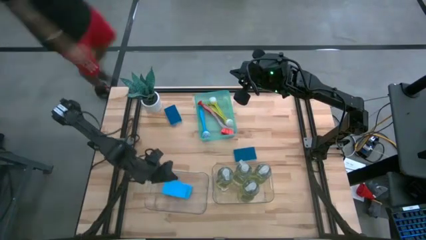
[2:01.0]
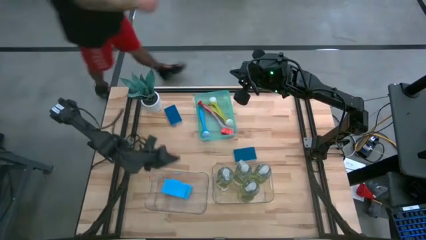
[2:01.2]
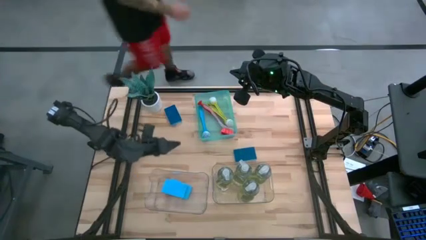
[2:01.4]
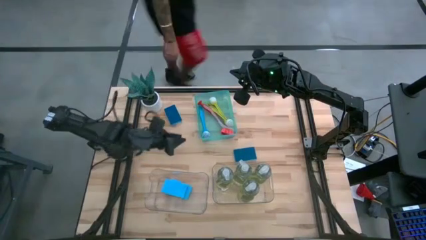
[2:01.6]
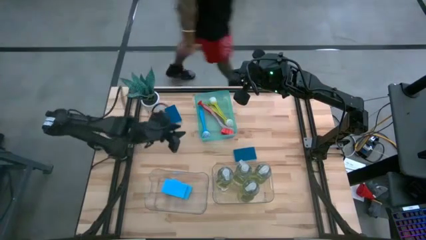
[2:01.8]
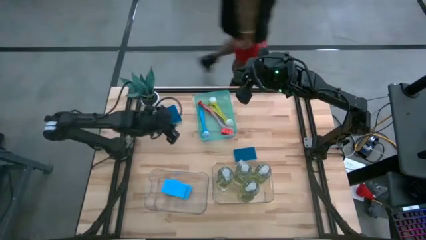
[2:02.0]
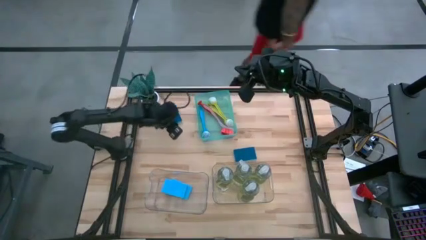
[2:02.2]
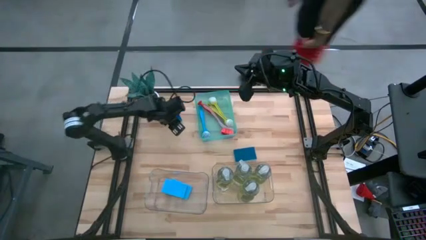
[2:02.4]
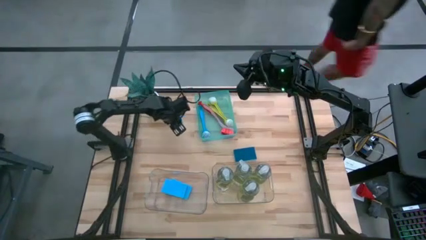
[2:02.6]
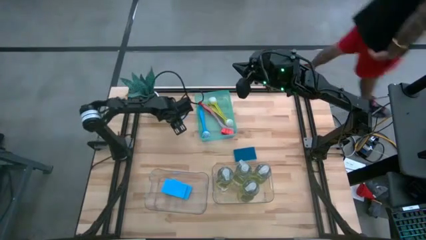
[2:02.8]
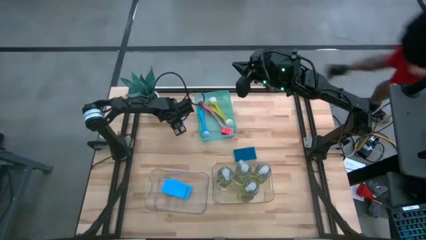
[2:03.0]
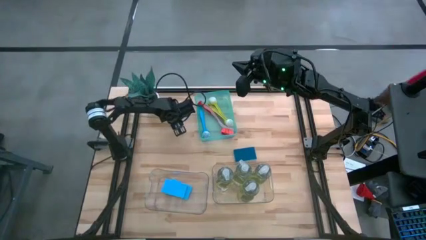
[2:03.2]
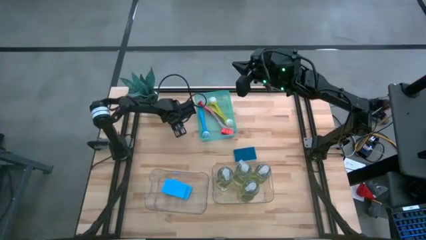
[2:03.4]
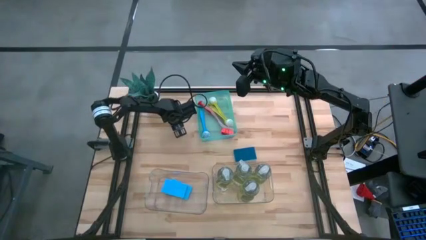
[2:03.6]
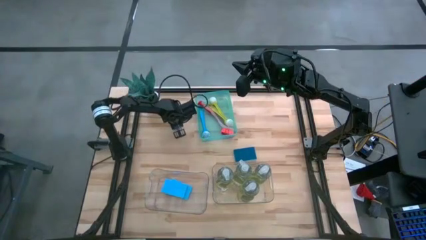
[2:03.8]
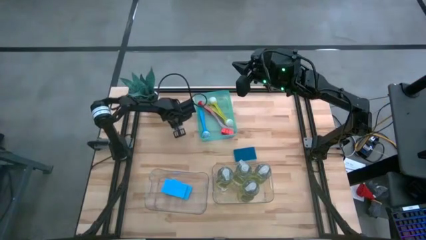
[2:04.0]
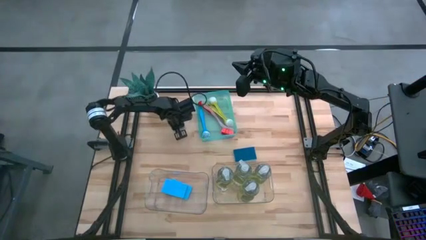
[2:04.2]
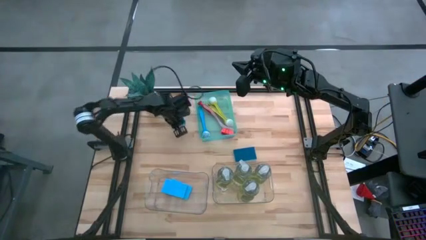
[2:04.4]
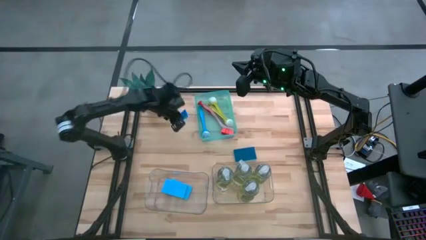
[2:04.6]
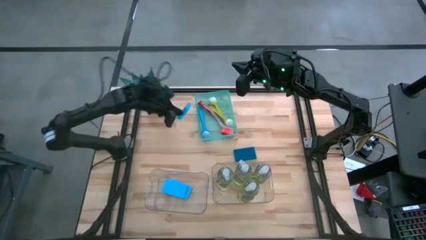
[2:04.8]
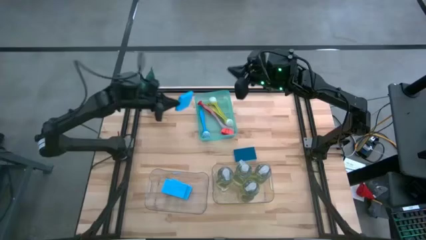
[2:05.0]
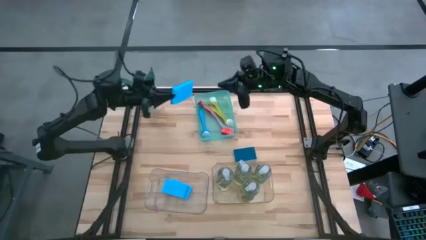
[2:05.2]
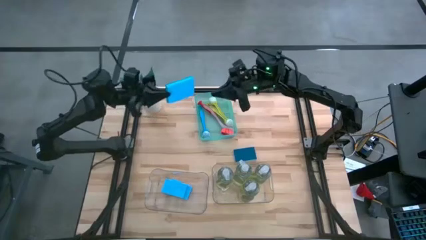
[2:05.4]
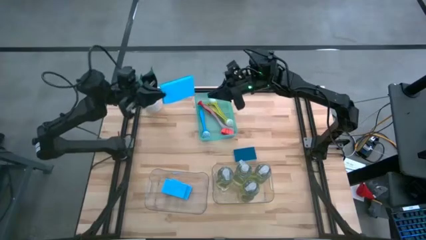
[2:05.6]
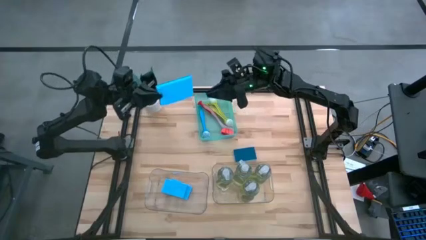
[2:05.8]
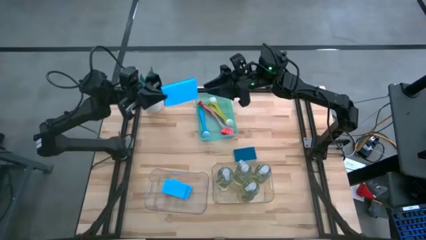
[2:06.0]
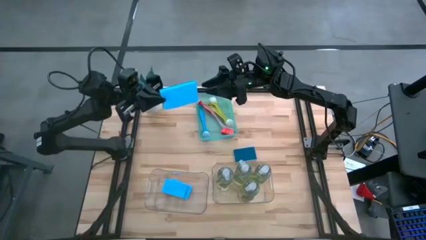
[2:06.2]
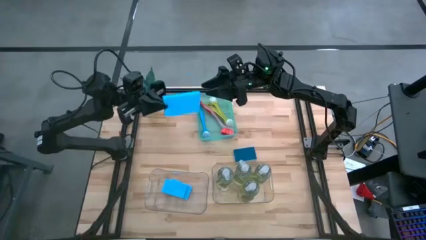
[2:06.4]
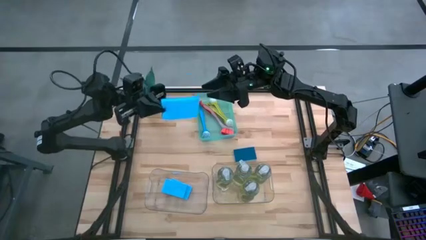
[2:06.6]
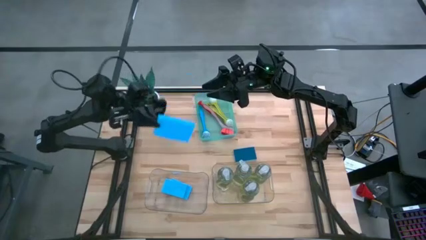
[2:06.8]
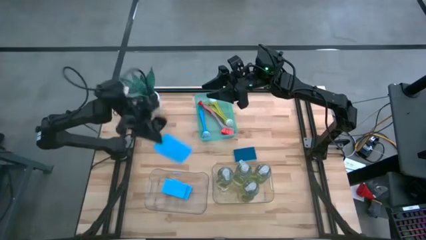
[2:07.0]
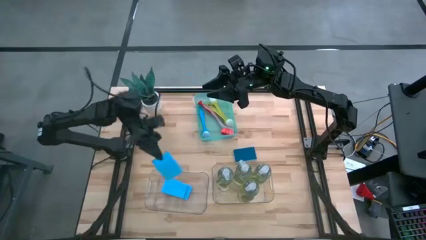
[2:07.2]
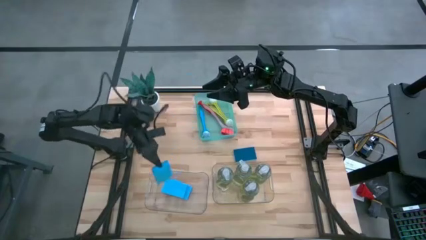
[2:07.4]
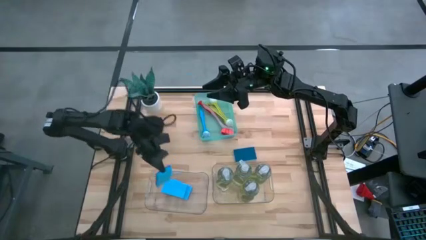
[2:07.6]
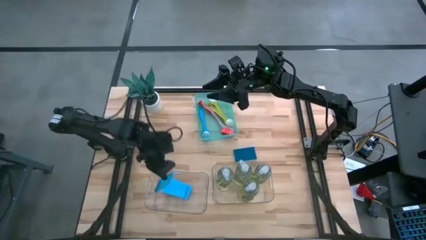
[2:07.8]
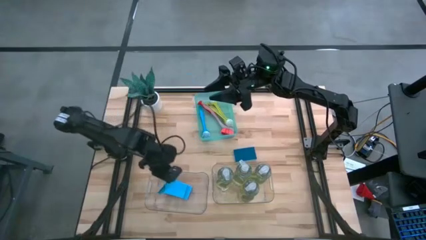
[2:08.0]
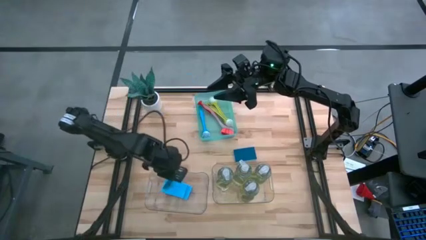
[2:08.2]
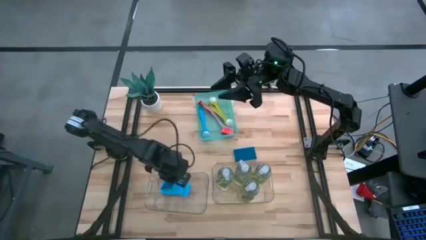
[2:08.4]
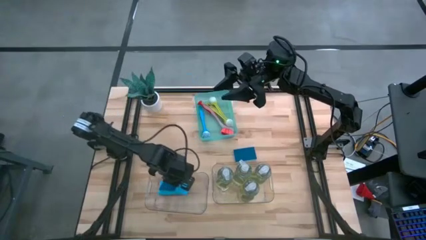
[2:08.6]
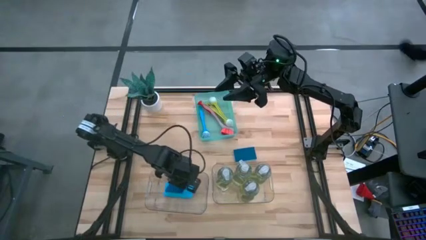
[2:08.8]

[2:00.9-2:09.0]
Task: Pick & Place Kitchen Sink Supplies
Put the blue sponge into the left transparent bin

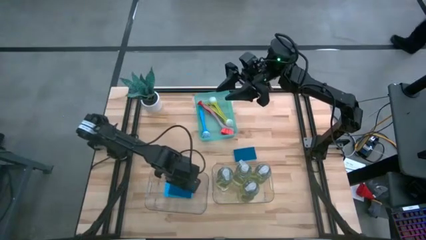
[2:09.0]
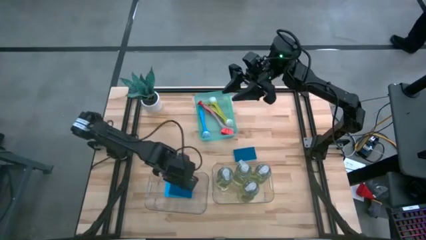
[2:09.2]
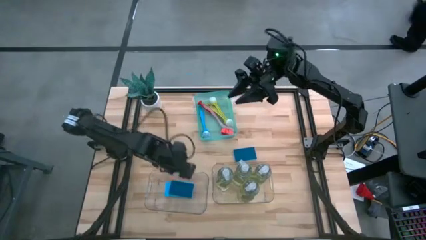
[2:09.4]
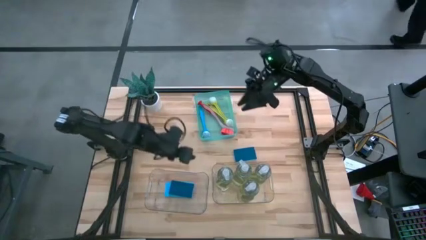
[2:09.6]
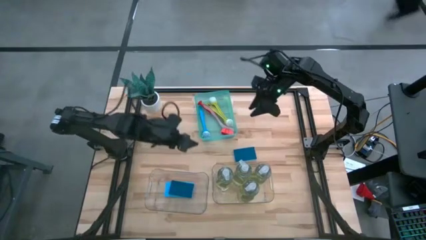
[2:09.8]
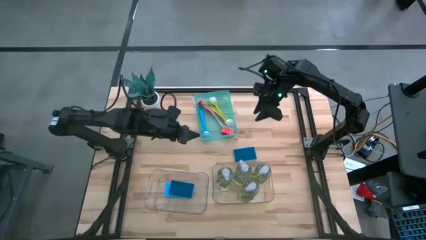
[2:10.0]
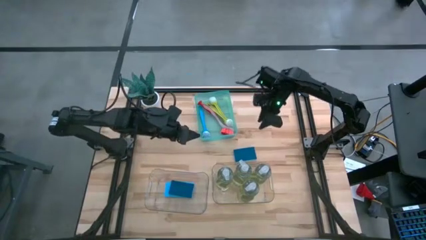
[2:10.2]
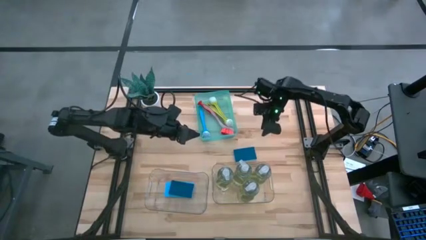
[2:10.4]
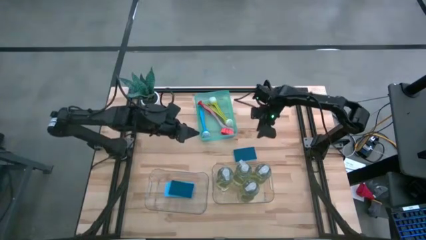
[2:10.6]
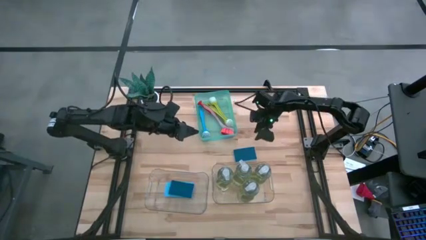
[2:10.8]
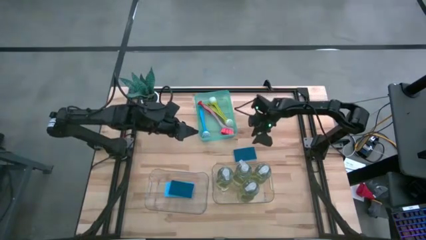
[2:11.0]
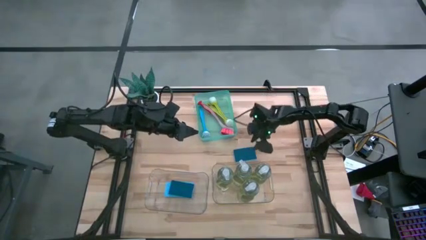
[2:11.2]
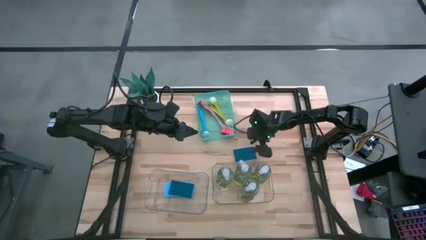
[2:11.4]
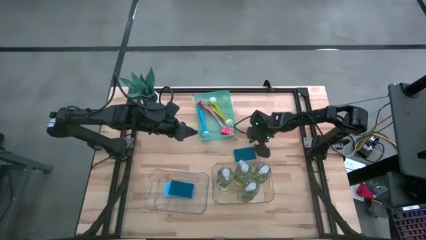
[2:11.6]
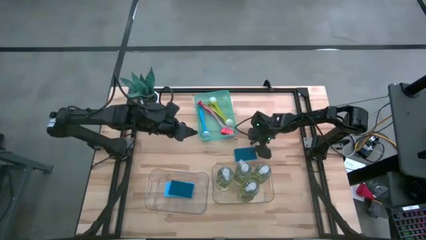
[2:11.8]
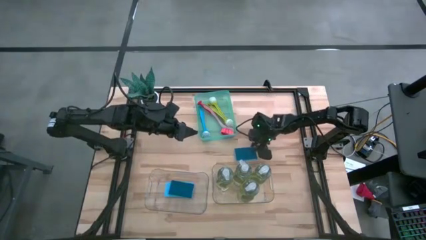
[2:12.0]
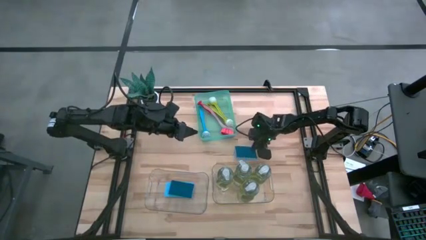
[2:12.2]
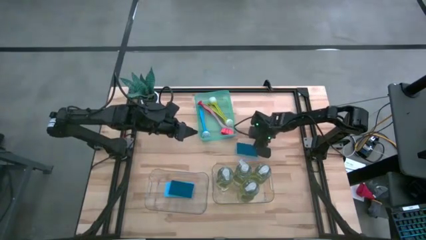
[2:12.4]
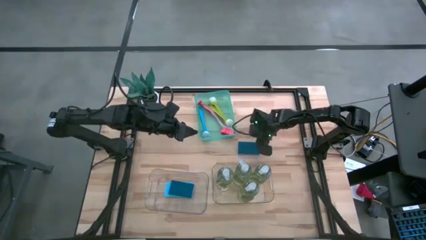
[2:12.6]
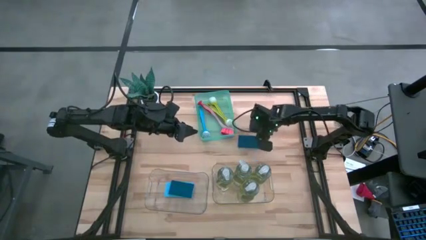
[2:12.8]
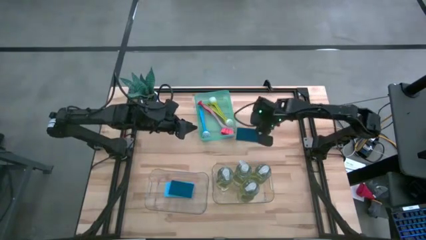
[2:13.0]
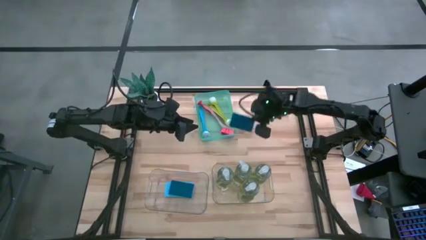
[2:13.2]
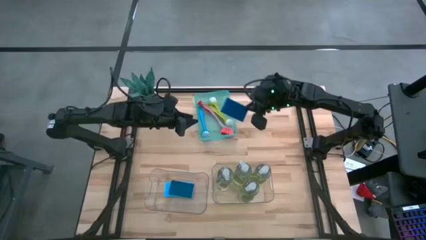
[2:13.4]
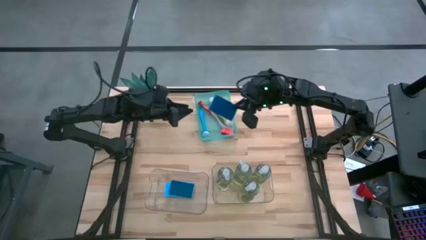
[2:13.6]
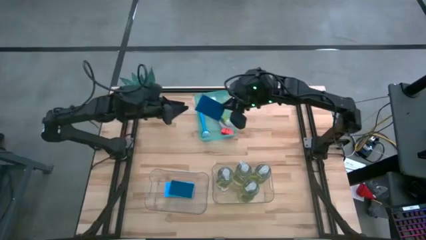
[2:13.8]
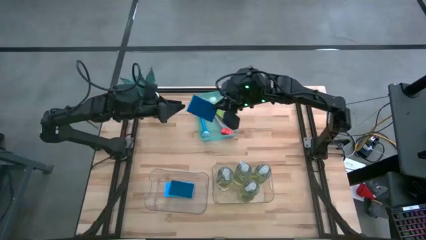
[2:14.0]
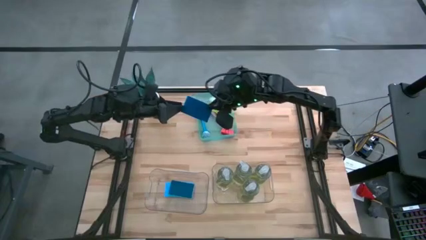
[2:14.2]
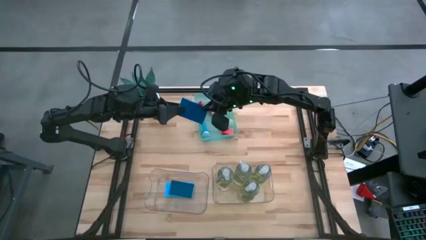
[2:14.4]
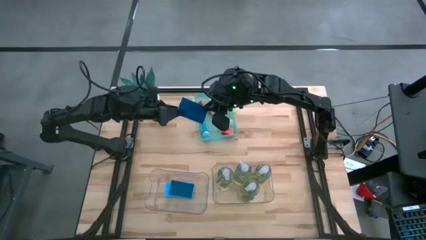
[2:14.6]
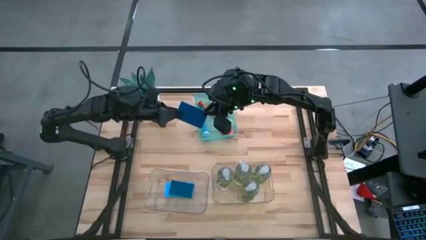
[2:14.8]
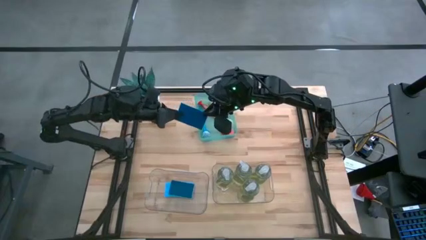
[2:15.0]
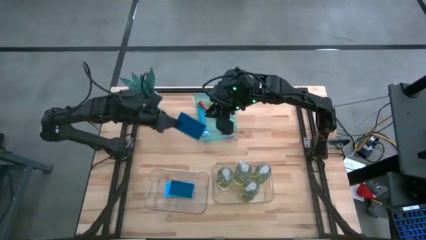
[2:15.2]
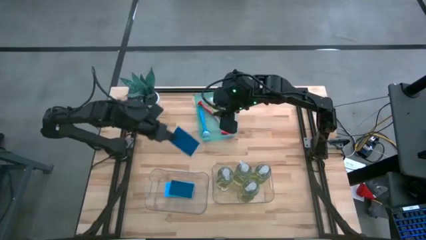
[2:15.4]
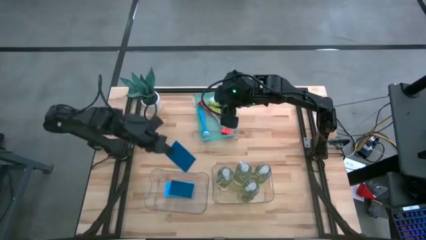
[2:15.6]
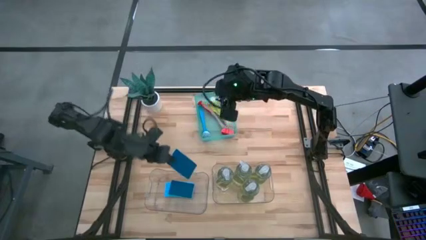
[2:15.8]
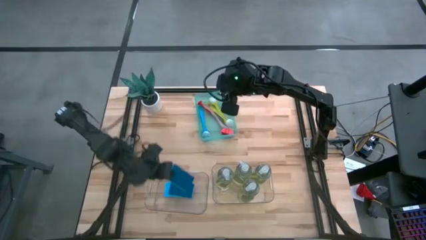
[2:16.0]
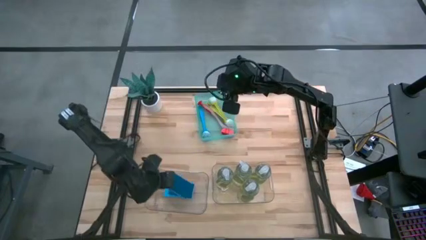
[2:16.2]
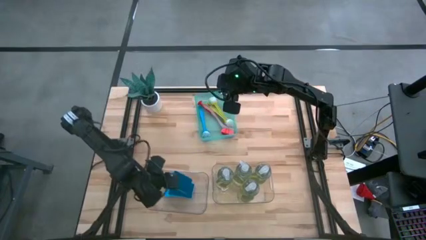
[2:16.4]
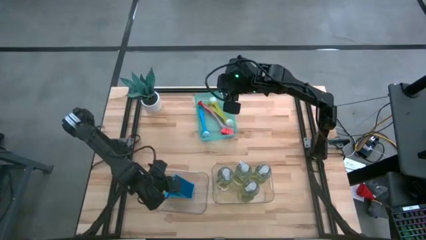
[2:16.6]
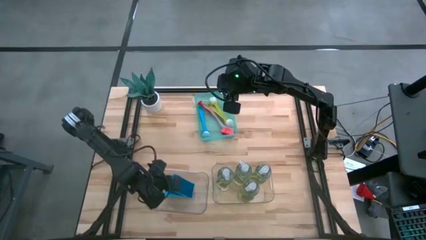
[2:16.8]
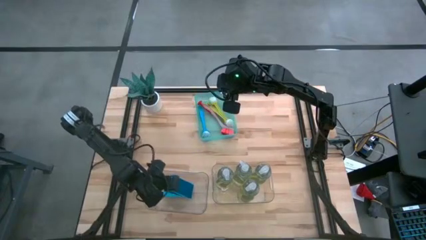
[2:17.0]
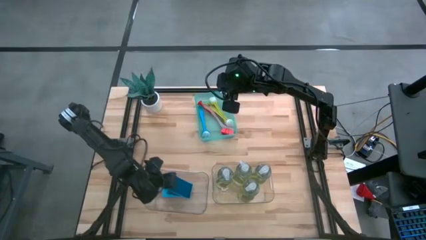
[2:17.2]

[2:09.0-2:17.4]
Put the blue sponge into the left transparent bin
